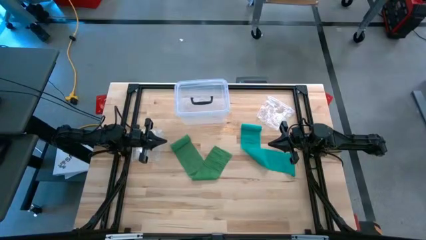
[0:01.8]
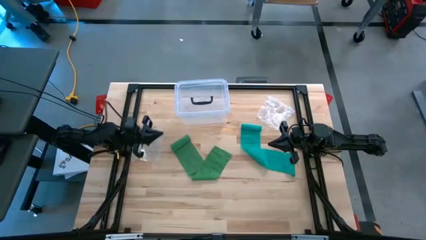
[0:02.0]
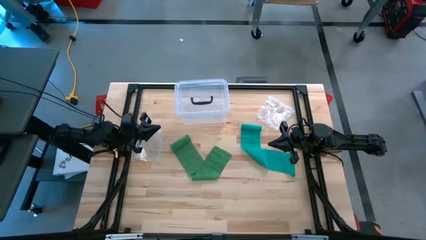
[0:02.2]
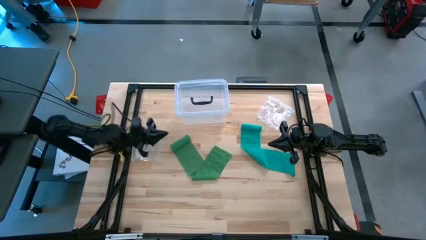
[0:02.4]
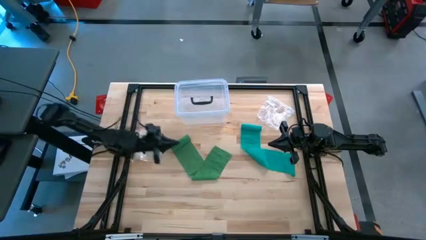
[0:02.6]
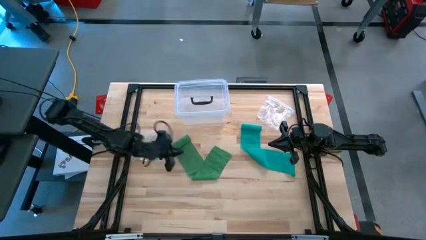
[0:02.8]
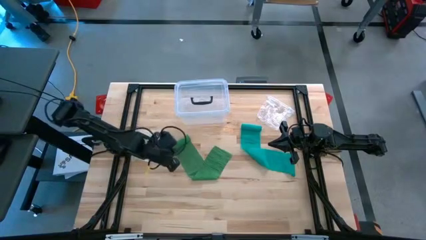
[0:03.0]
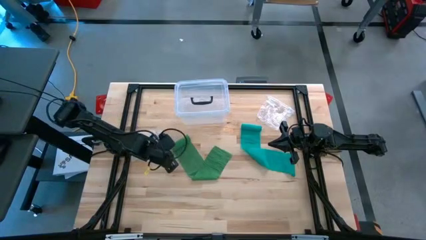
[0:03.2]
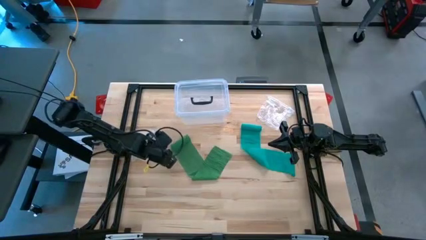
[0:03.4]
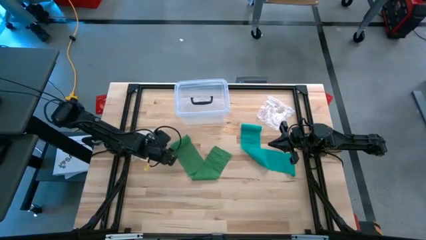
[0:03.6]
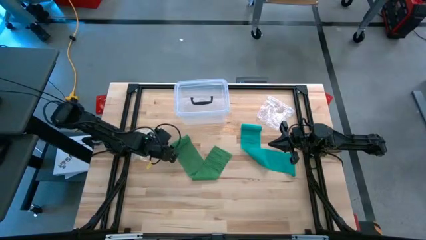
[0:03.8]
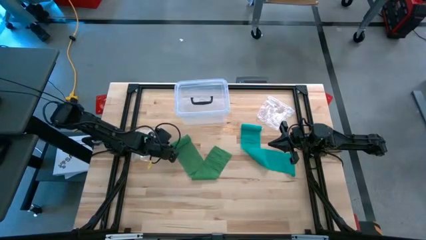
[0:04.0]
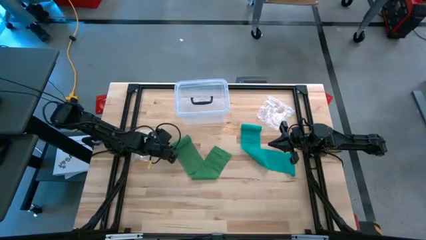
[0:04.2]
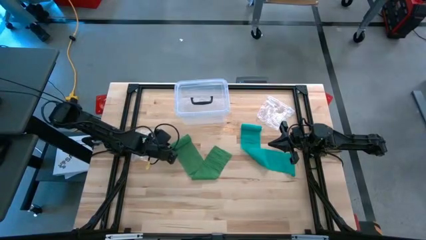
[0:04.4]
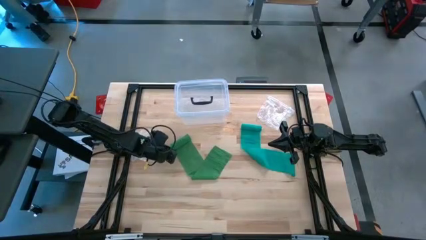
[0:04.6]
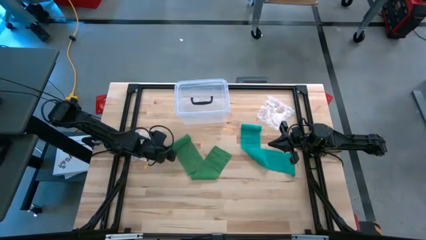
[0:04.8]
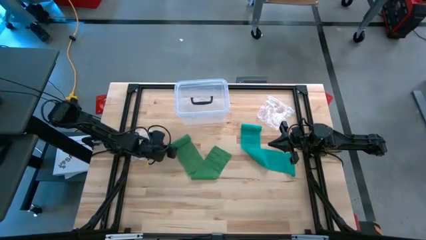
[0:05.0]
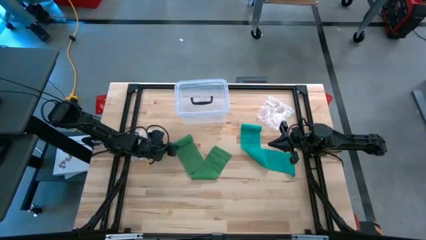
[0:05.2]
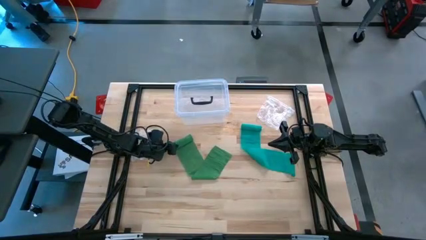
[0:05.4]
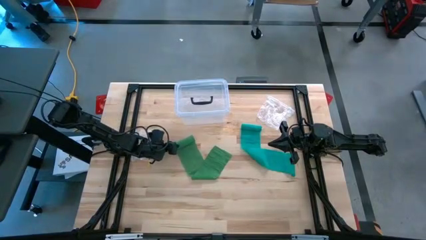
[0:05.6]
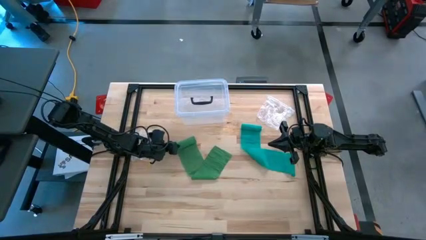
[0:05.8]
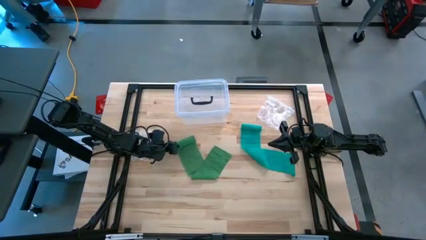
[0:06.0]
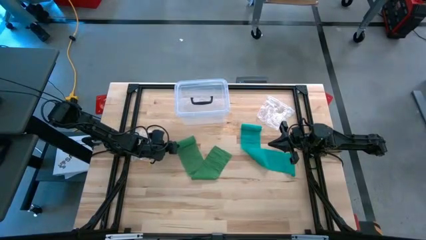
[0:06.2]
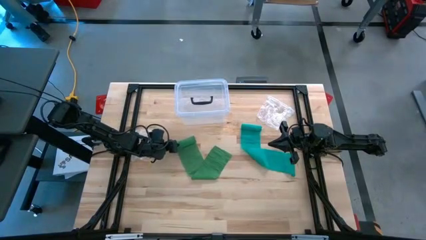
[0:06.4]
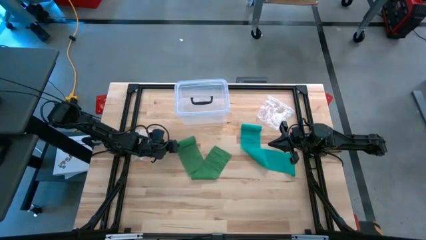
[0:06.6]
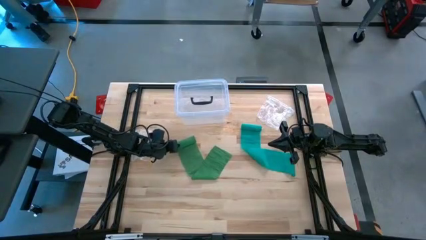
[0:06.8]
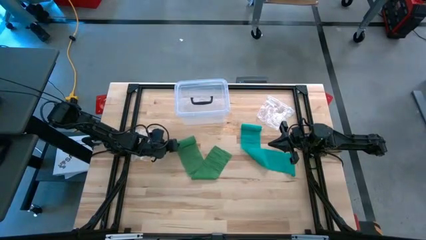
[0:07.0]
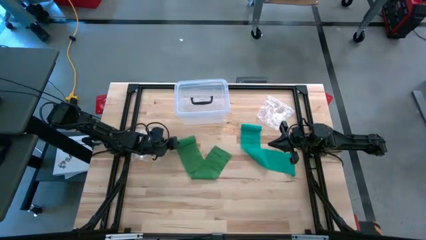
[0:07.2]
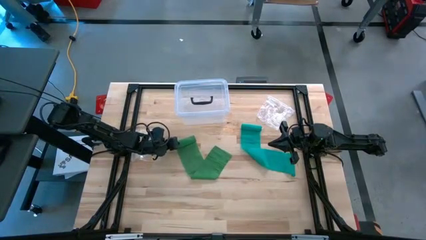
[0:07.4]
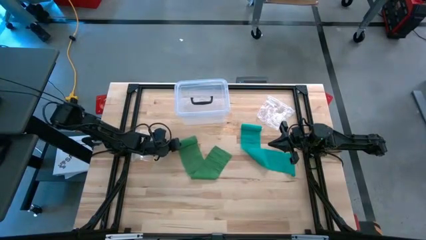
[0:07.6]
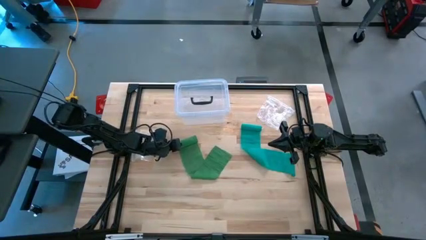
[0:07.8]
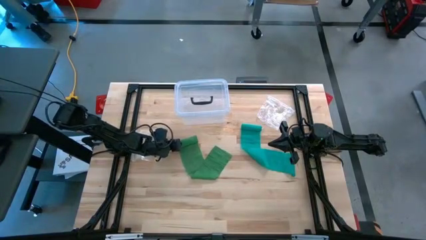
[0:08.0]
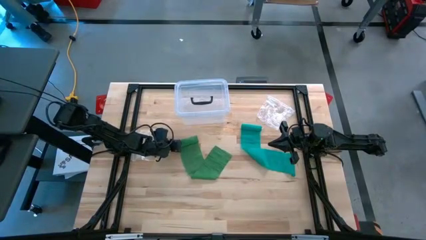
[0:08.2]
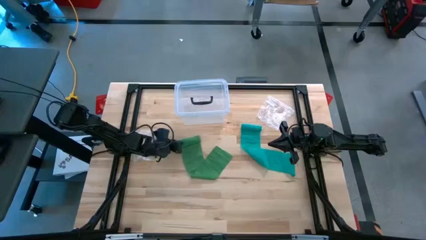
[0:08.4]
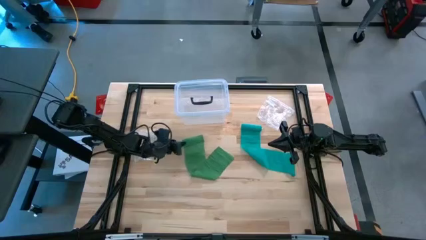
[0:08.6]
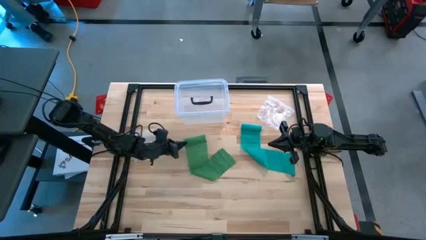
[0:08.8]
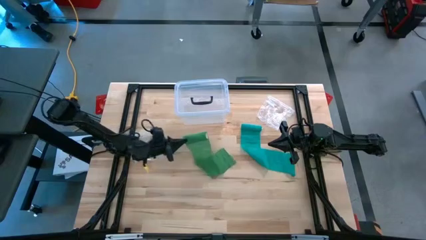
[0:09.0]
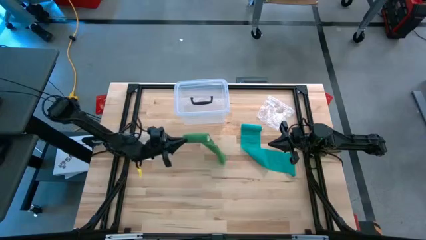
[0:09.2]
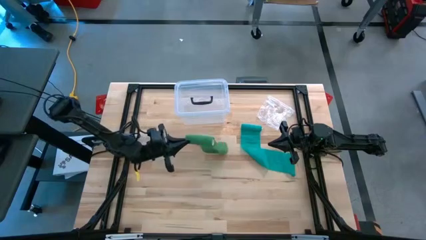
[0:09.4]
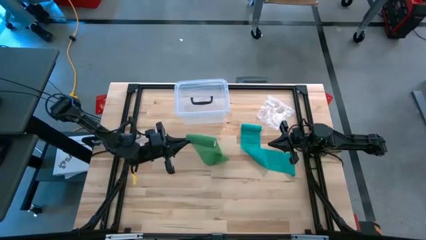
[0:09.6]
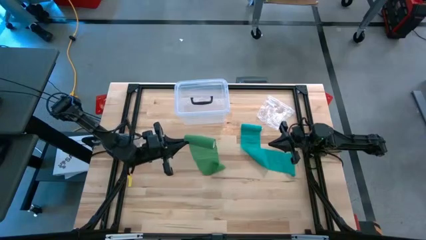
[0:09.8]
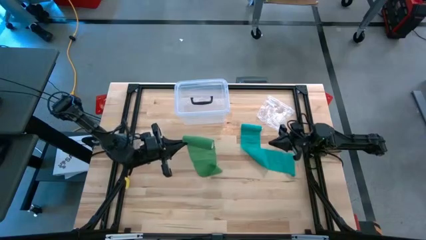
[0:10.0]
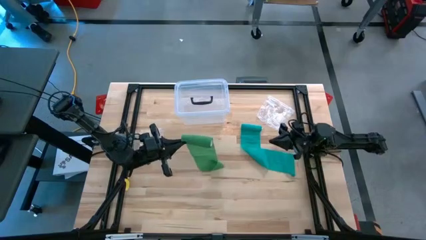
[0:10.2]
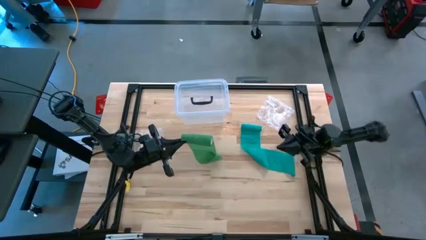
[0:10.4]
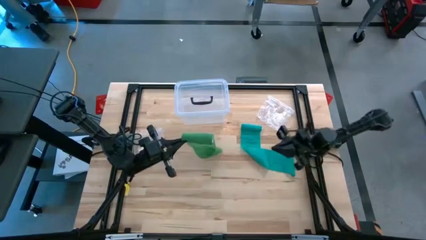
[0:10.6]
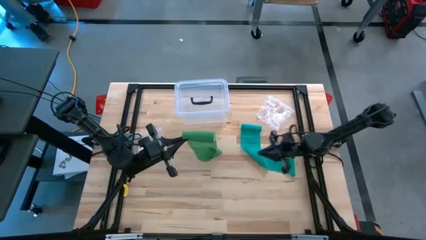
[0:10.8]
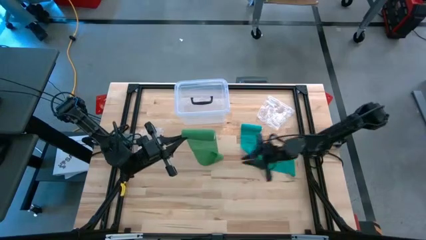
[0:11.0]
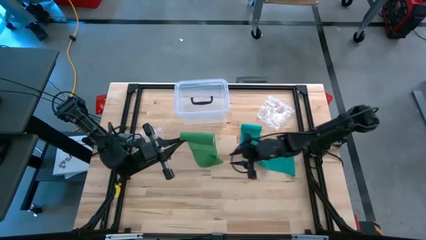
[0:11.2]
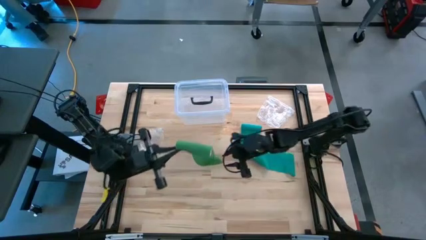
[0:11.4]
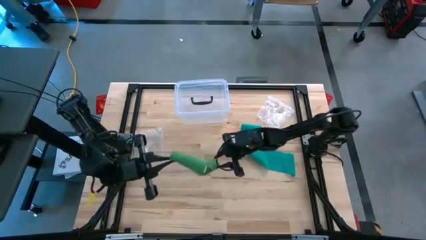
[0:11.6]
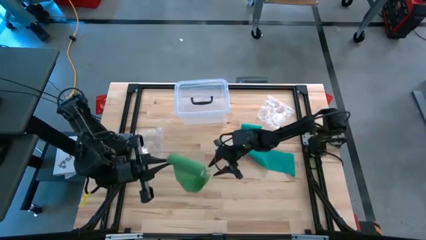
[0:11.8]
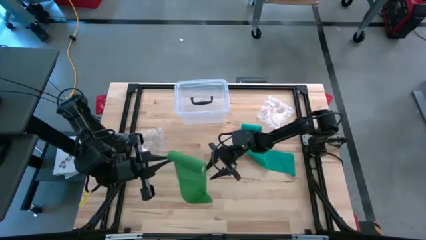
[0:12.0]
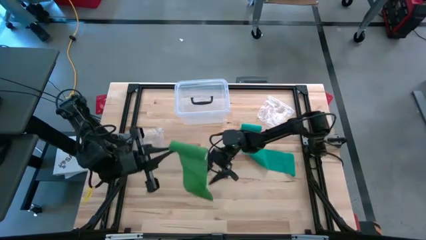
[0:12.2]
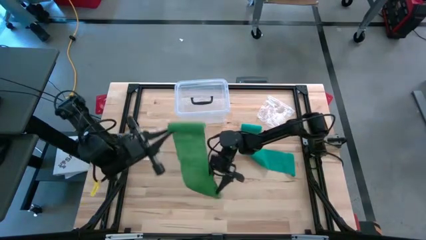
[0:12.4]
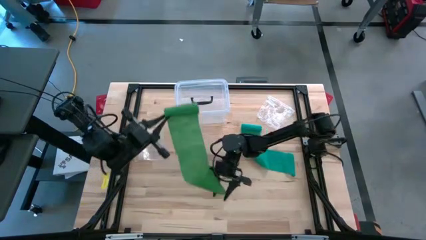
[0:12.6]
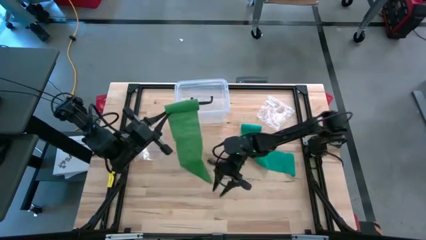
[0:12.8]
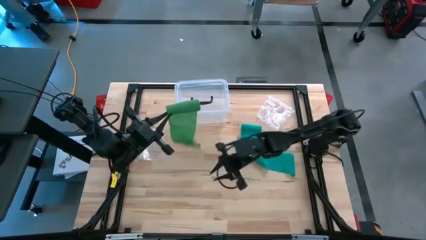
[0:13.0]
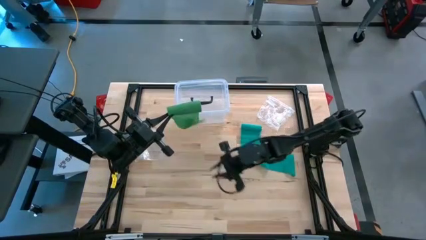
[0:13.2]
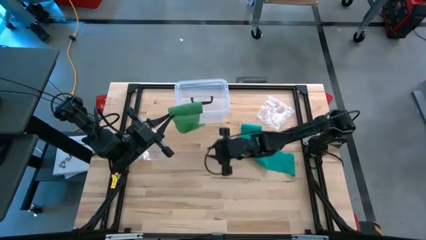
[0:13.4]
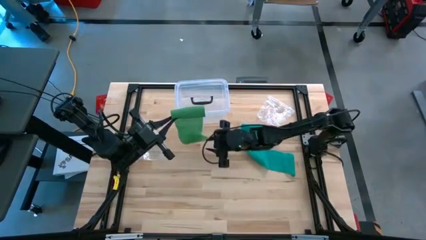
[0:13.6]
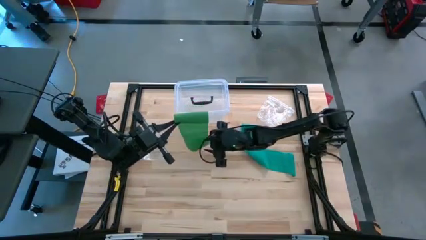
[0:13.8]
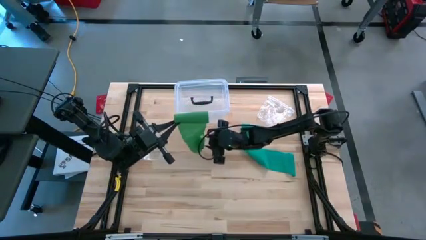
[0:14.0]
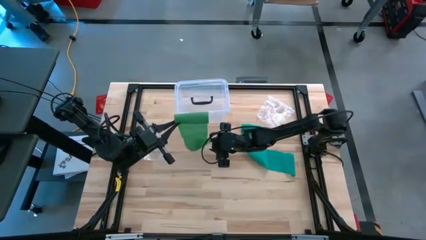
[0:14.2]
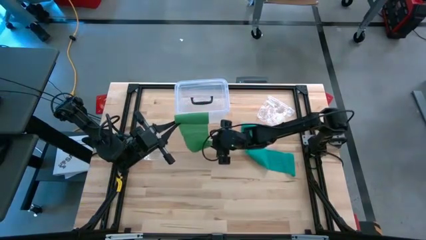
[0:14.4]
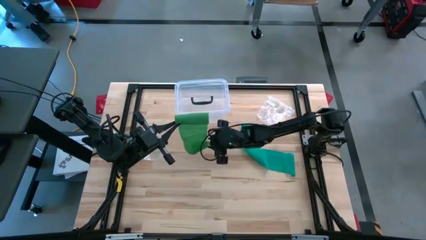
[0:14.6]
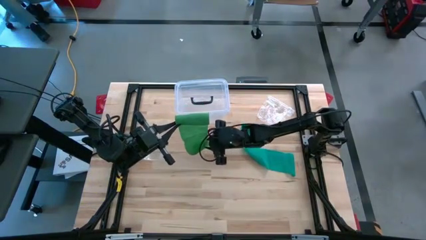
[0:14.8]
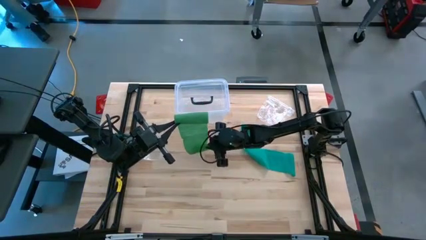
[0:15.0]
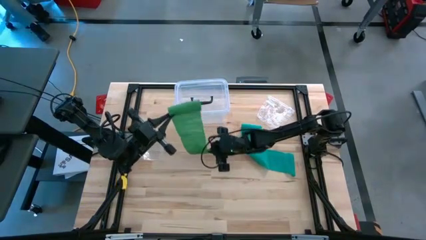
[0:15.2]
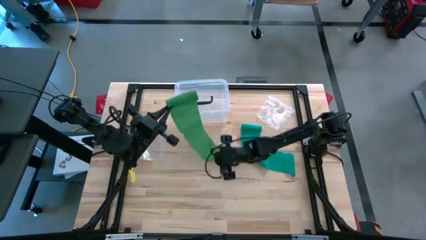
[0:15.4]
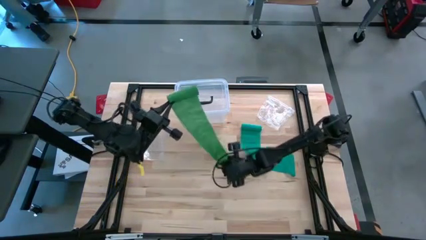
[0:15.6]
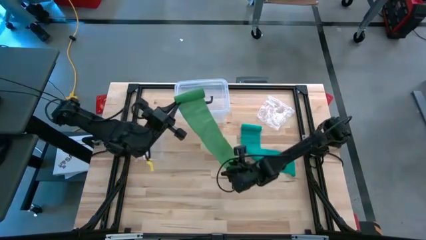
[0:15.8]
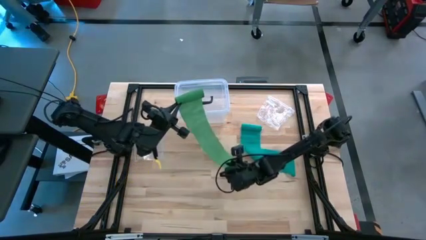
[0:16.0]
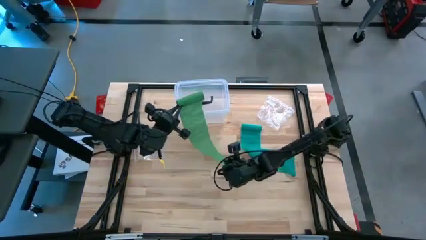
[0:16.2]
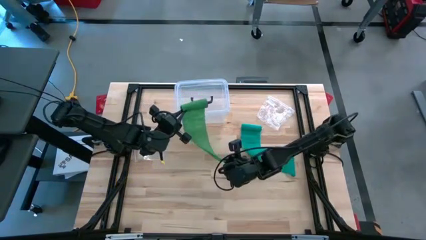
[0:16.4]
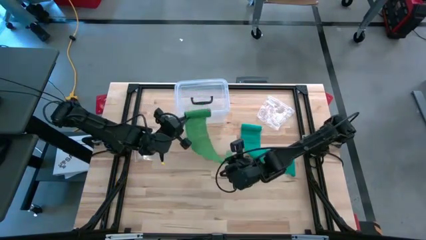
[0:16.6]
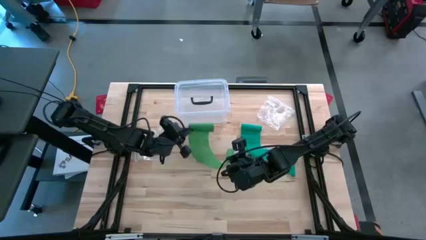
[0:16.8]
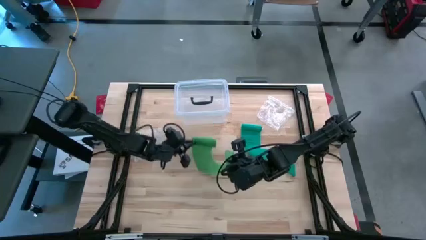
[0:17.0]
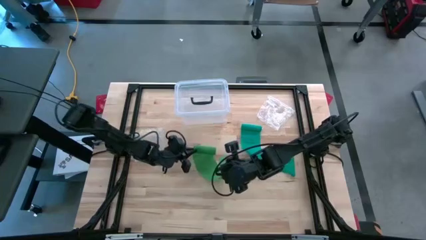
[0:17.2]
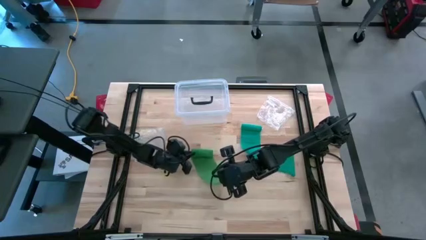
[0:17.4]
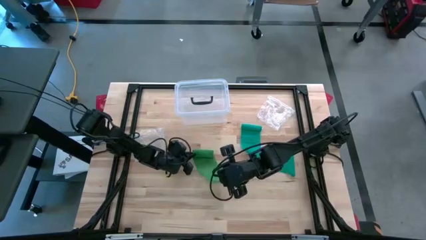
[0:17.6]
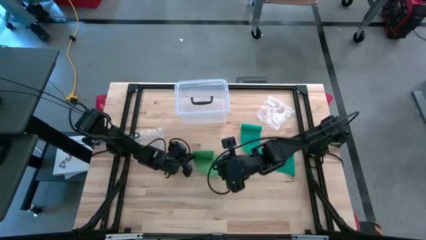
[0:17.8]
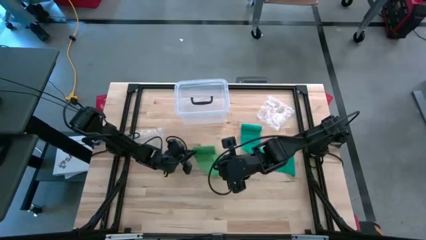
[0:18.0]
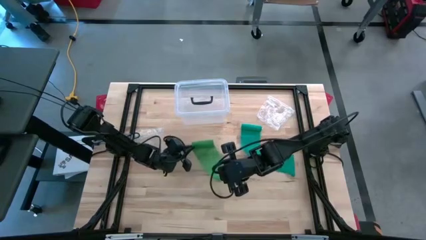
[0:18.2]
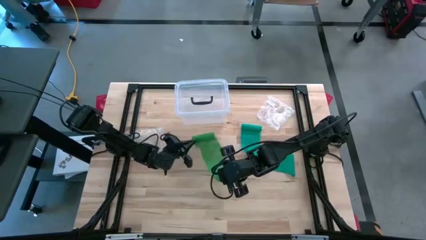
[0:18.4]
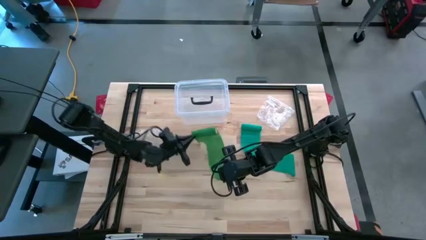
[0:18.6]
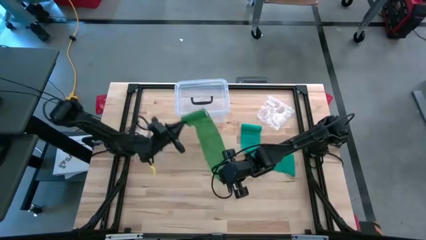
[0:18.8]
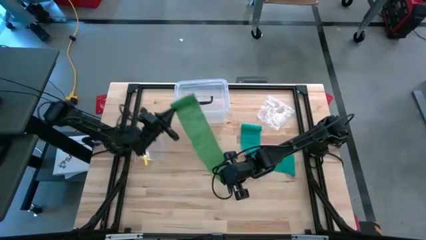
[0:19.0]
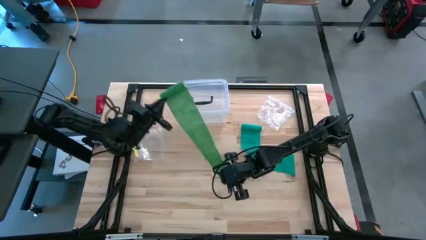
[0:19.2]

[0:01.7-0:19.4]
Task: Roll bandage
Roll the green bandage
